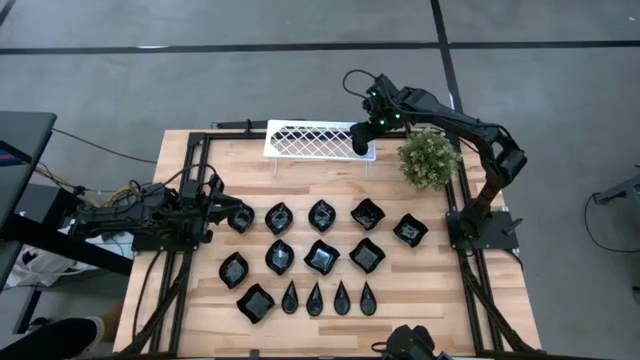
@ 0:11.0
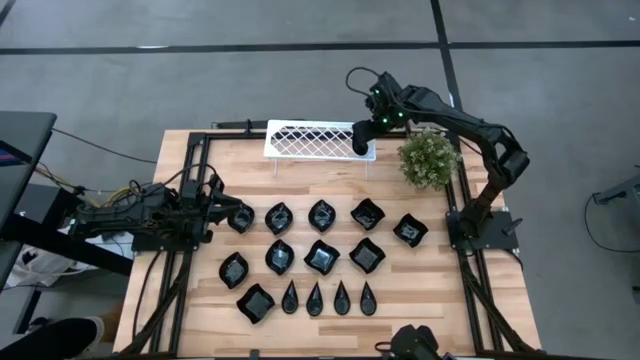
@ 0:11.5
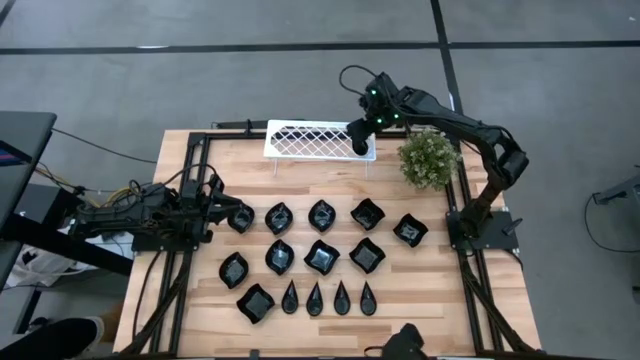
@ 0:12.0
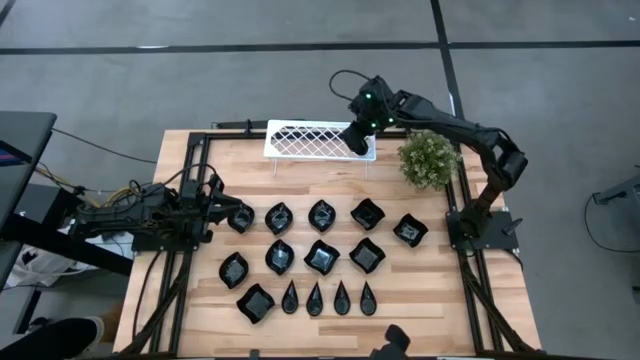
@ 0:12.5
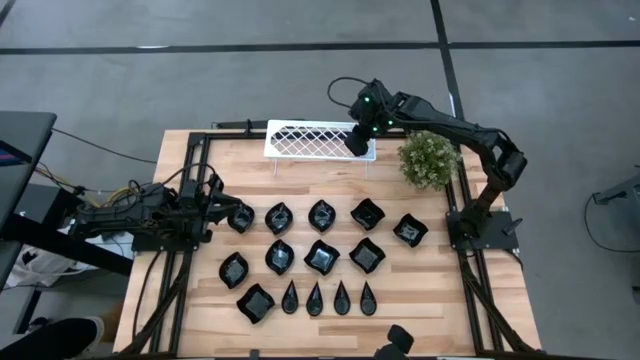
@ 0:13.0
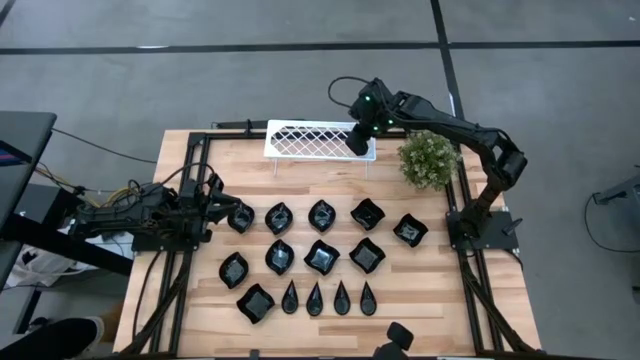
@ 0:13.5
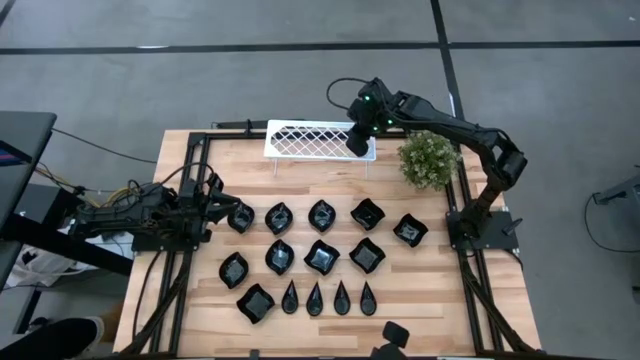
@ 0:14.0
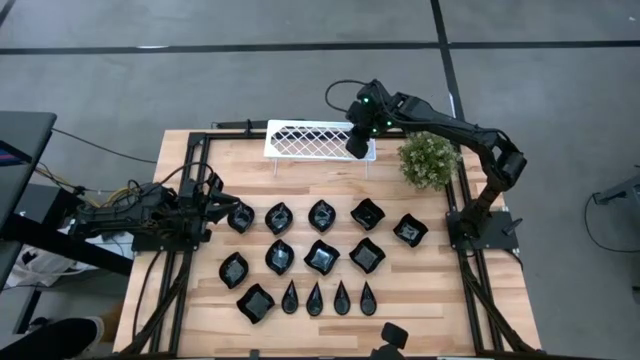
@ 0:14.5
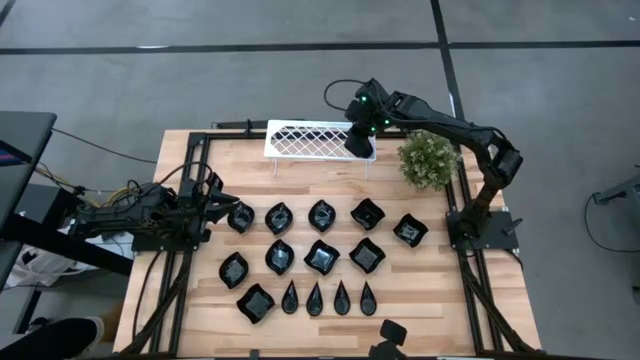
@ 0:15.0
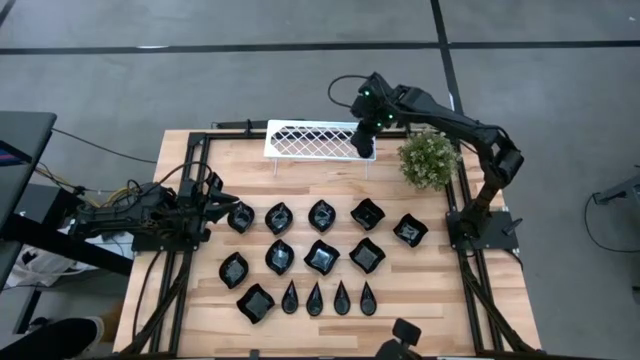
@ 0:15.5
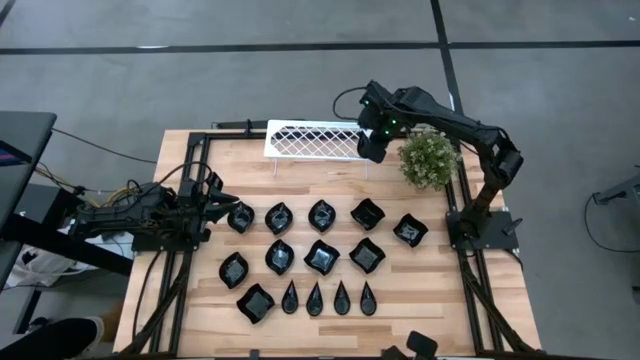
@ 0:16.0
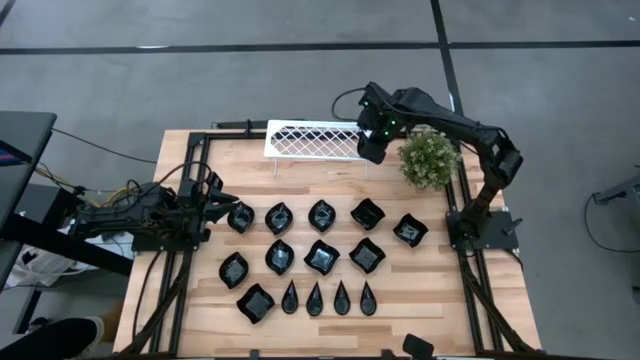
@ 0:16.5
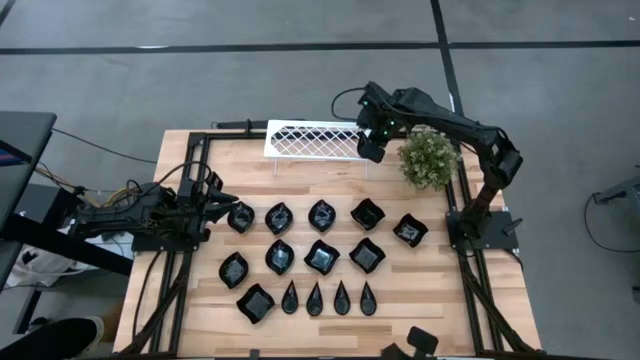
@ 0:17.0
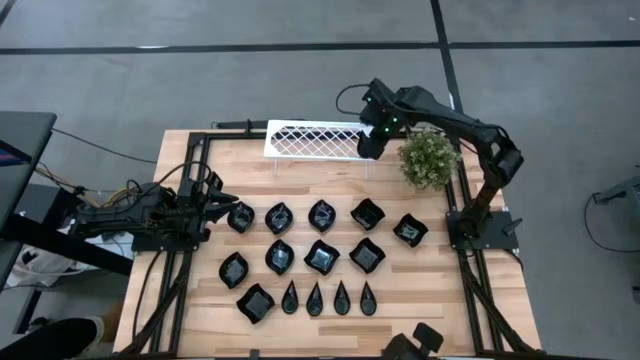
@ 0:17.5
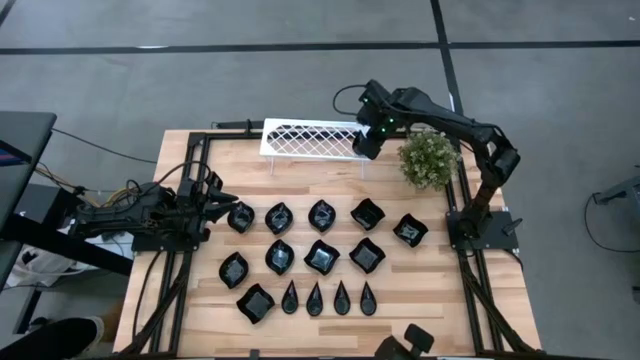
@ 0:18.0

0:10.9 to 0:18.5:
Task: Pick & Place Mini shaped plates
Adjust the shelf

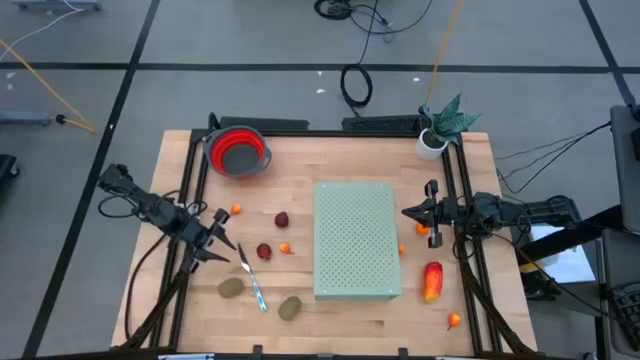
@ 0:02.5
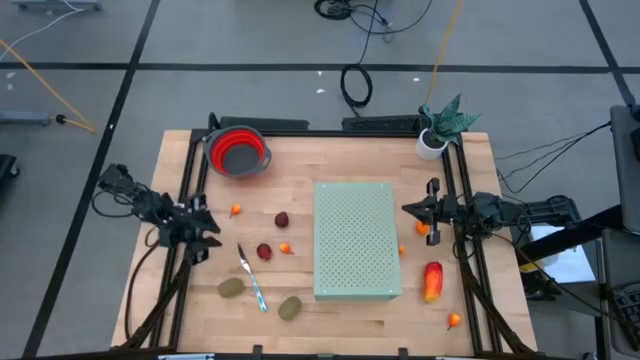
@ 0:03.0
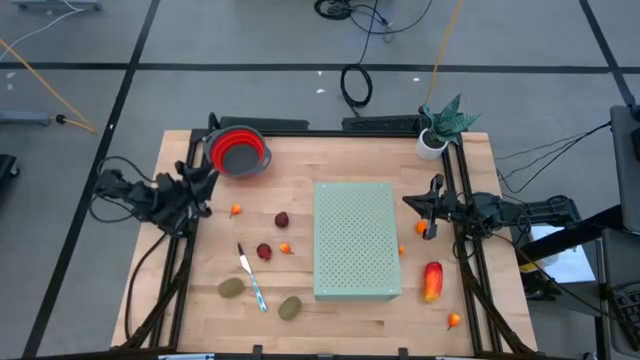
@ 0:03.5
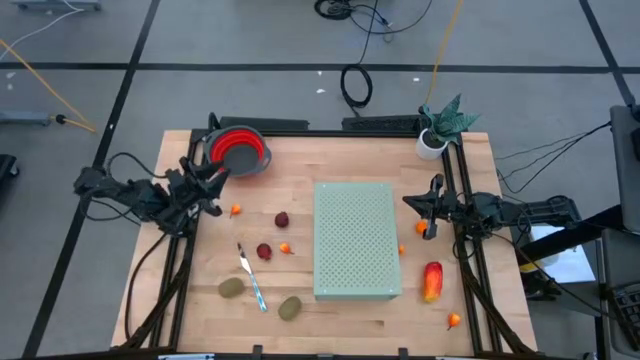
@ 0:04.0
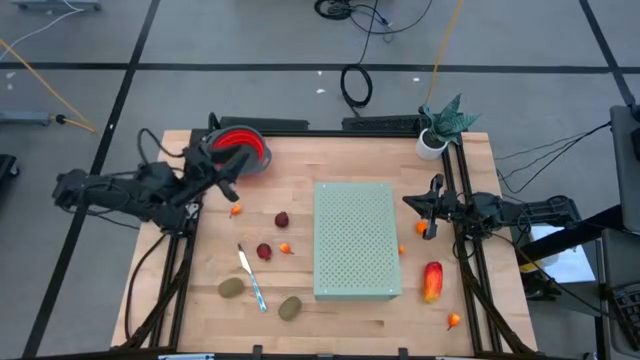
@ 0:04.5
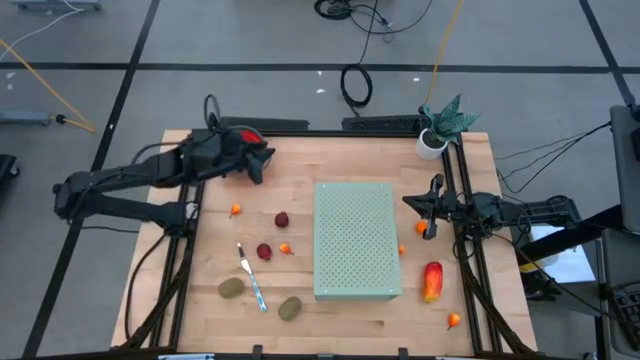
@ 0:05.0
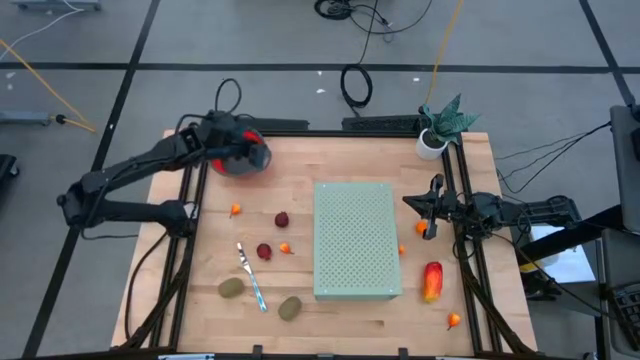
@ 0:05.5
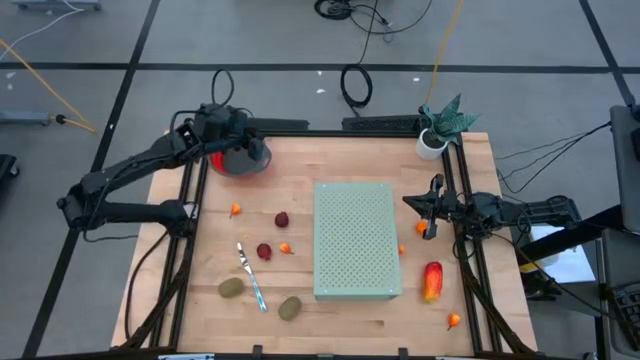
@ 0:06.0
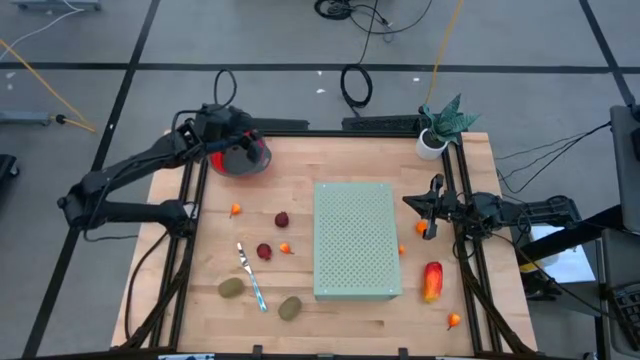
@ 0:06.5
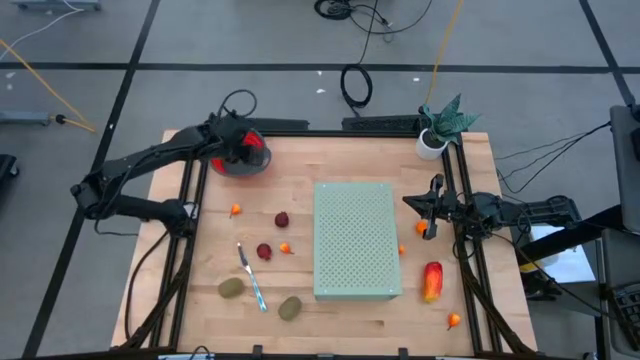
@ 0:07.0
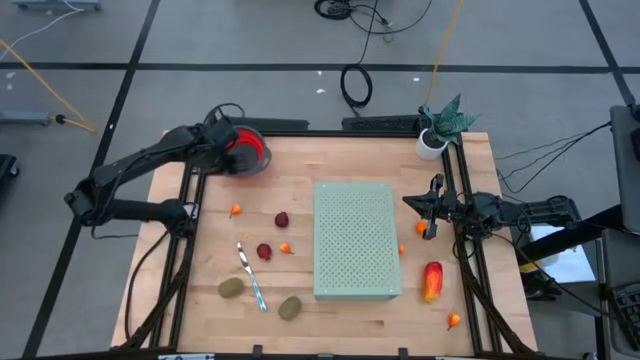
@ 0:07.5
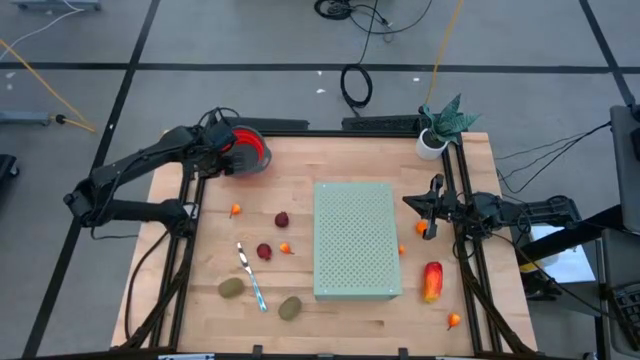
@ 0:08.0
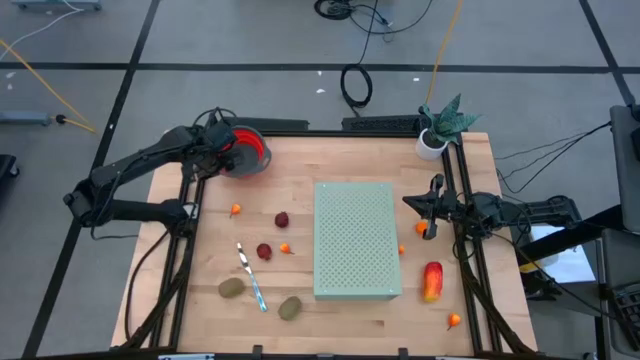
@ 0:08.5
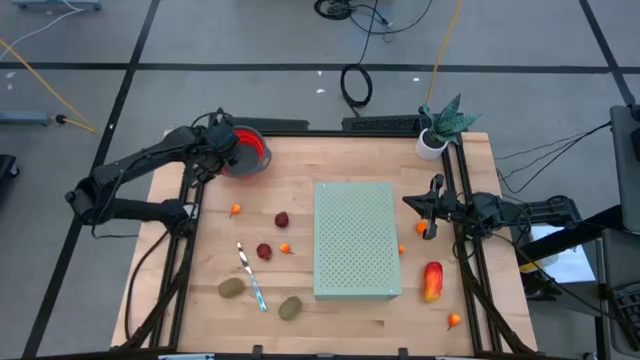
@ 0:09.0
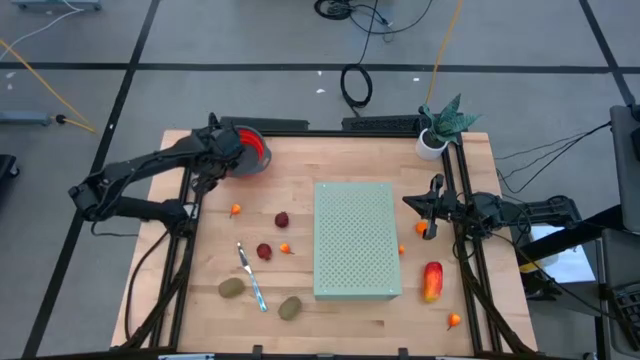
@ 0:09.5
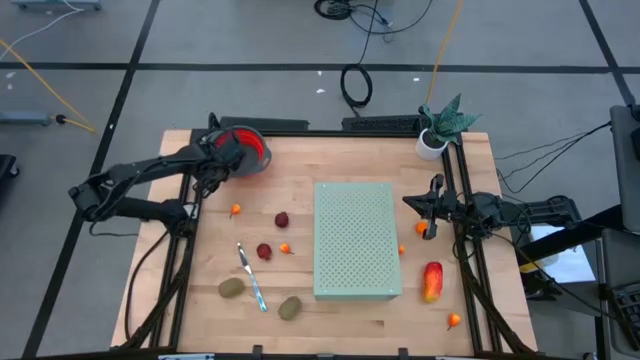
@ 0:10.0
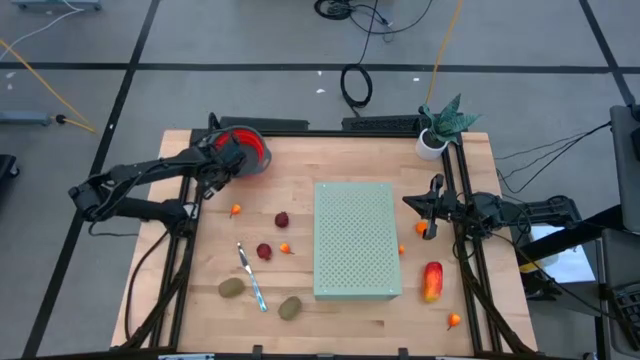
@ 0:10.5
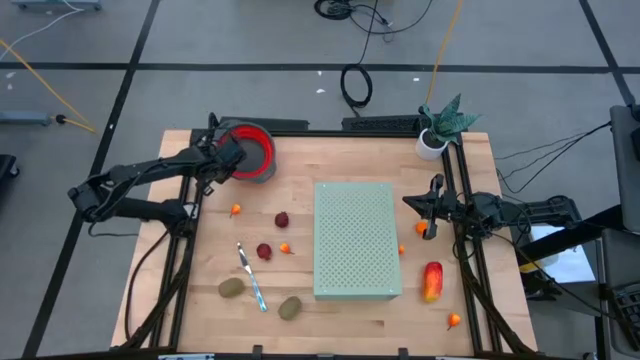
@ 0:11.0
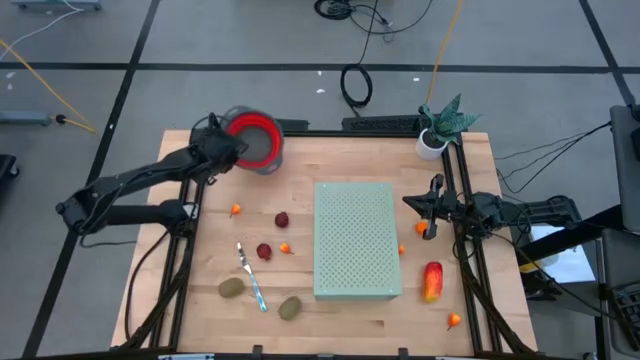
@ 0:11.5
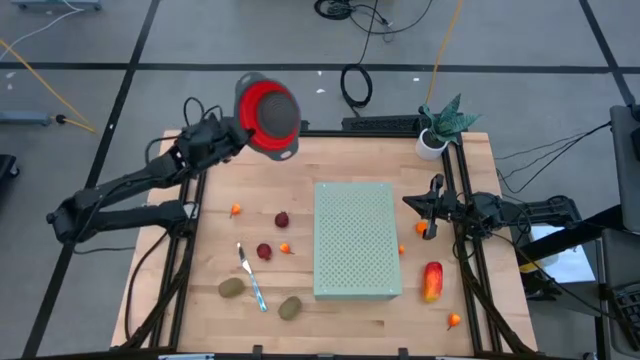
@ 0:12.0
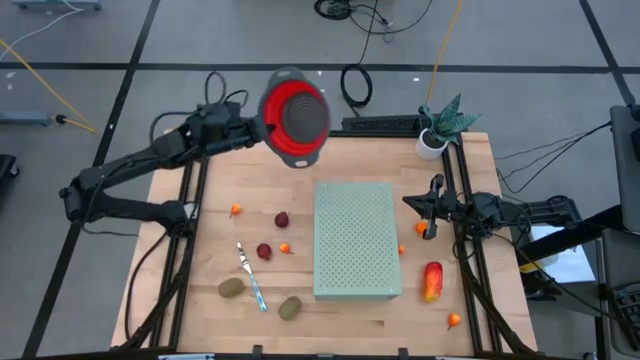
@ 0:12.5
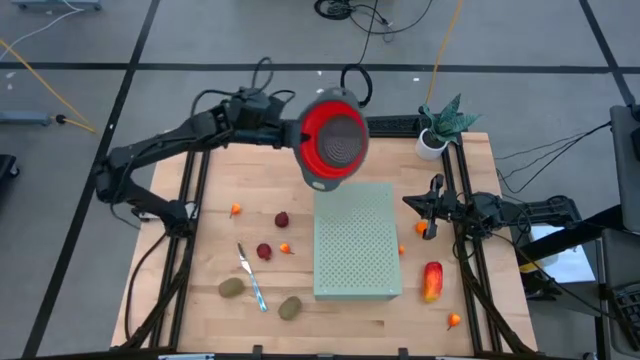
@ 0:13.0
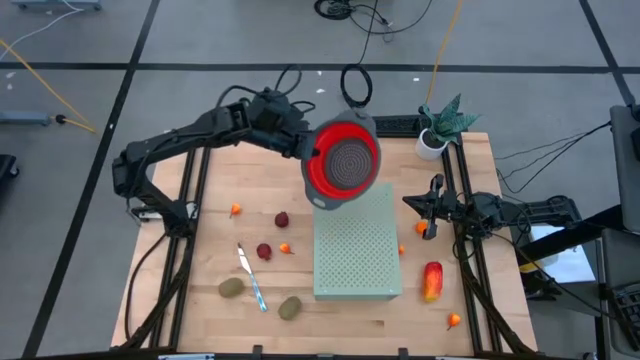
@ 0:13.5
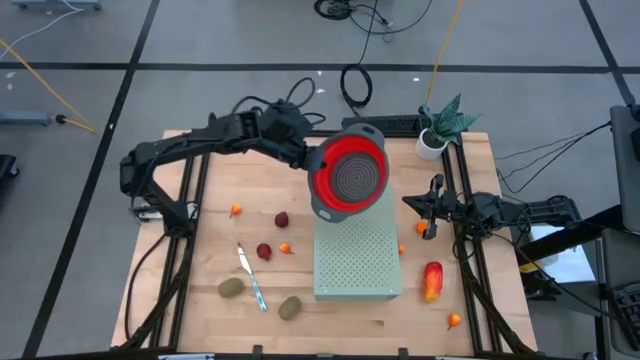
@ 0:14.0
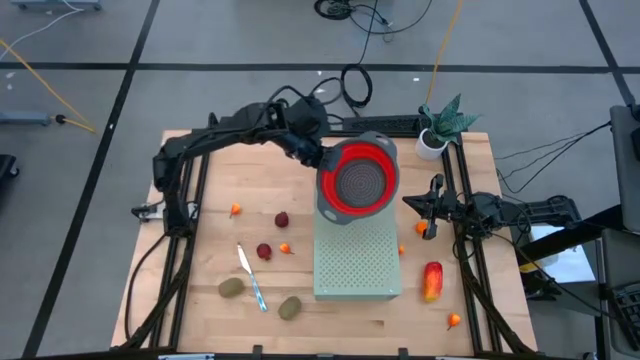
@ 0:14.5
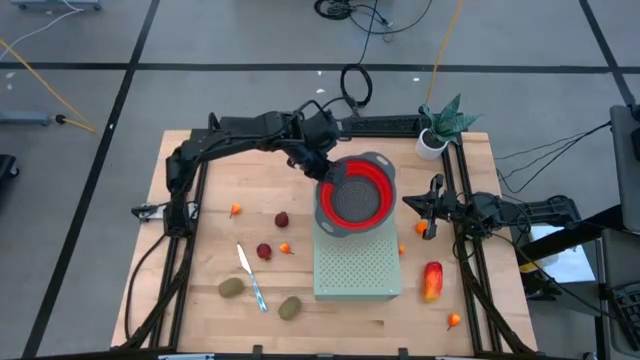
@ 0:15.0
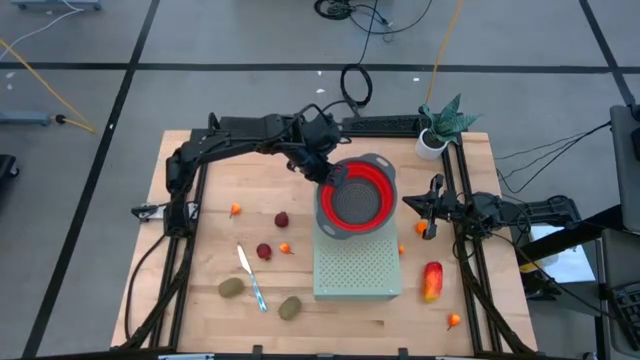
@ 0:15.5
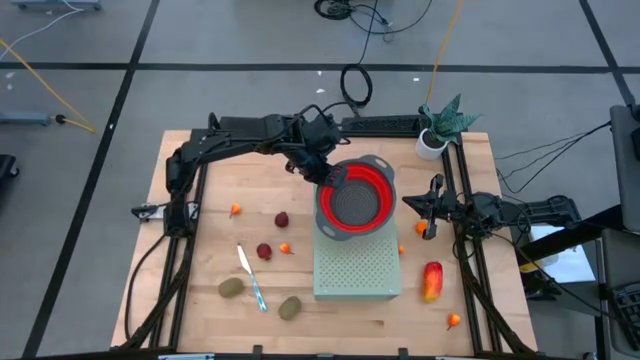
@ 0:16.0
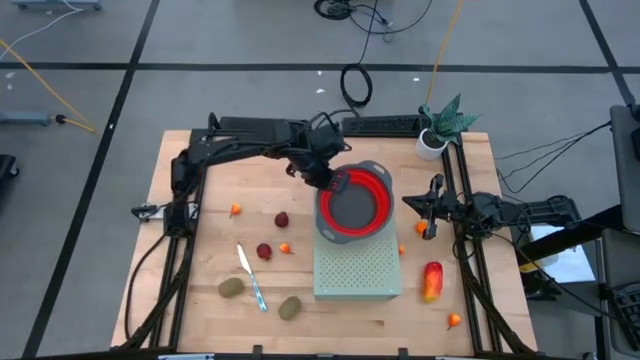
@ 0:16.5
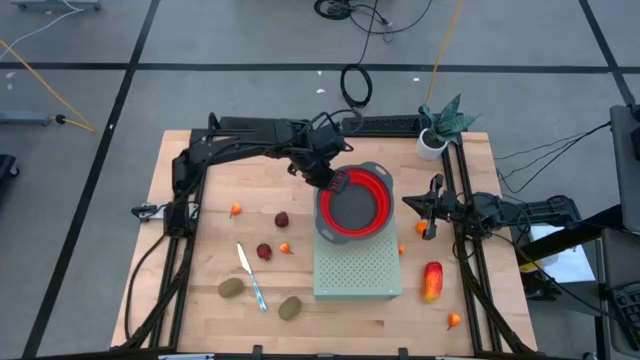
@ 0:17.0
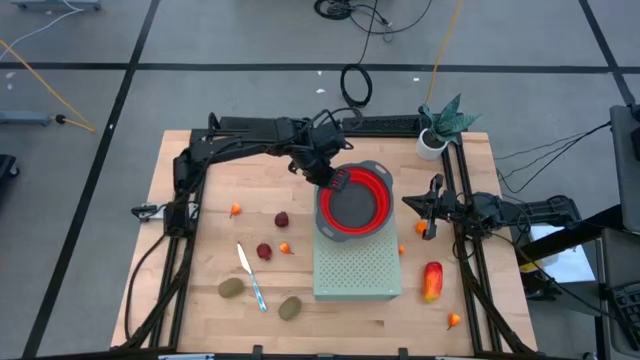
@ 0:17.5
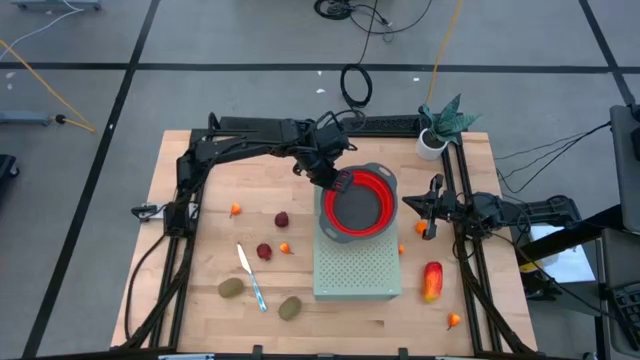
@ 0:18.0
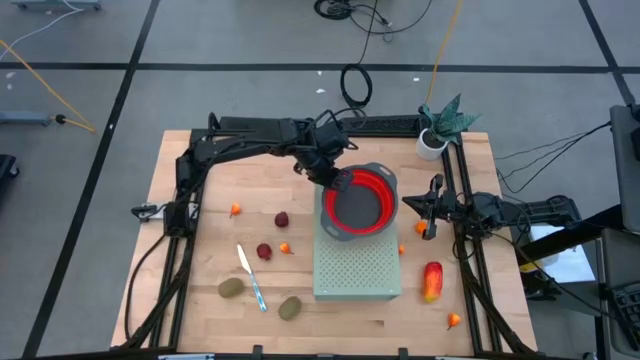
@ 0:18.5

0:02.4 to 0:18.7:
Task: Pick & Place Fruit
Put the red strainer bowl on the shelf
